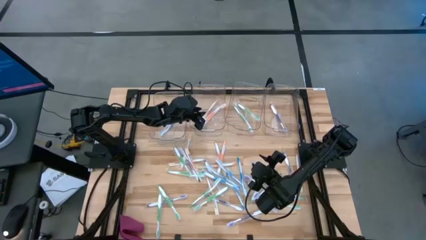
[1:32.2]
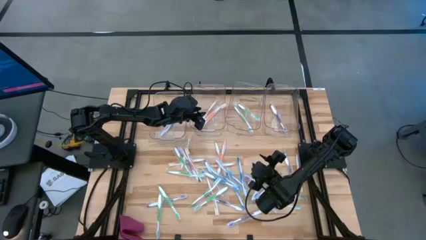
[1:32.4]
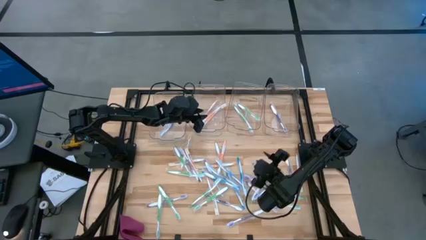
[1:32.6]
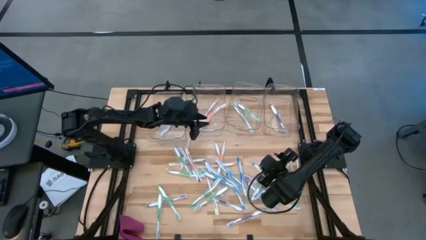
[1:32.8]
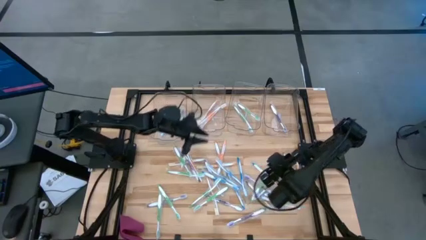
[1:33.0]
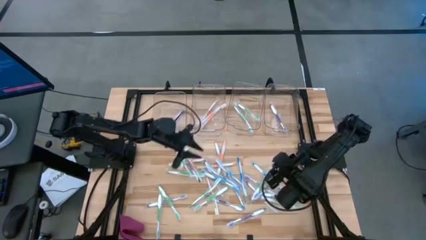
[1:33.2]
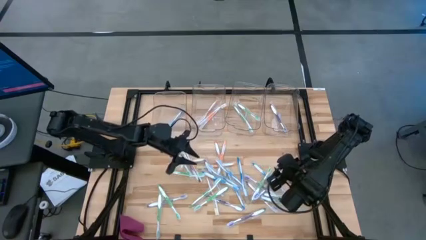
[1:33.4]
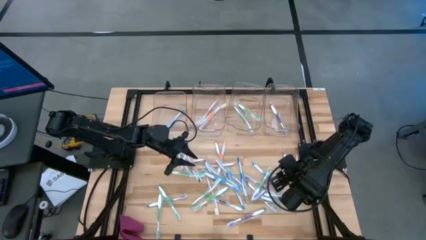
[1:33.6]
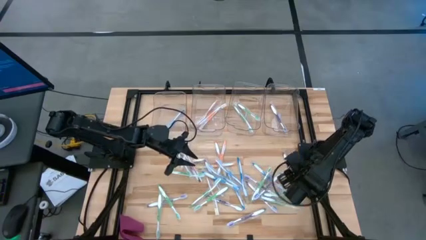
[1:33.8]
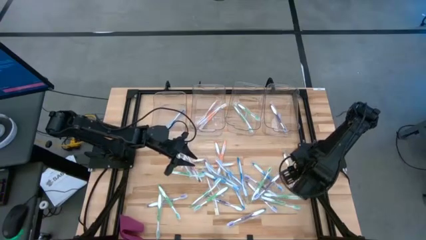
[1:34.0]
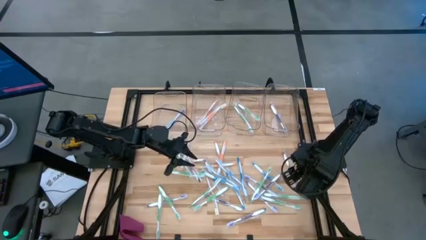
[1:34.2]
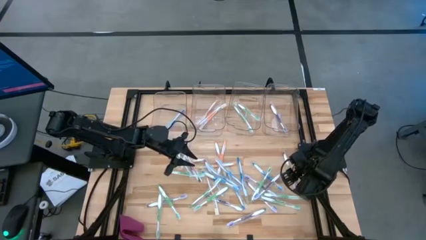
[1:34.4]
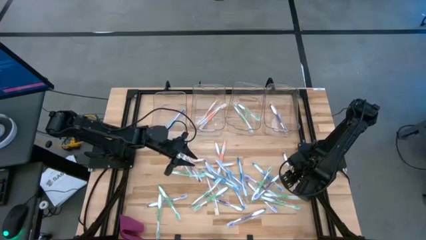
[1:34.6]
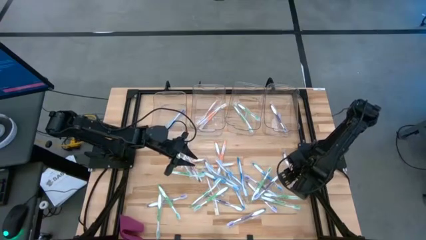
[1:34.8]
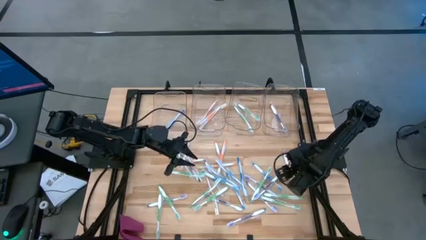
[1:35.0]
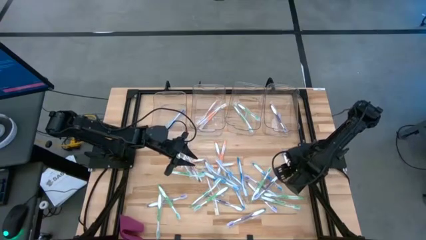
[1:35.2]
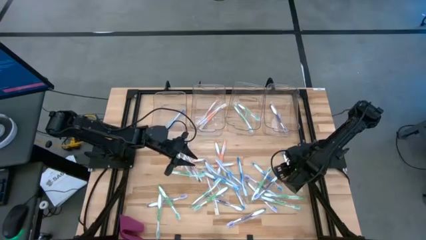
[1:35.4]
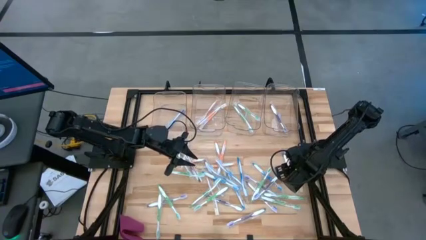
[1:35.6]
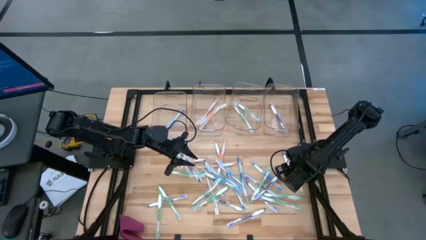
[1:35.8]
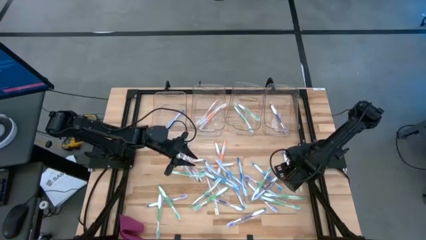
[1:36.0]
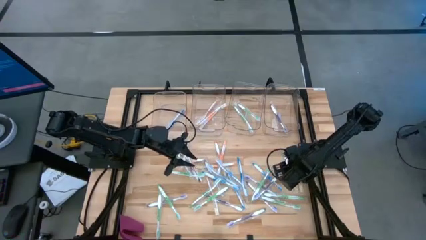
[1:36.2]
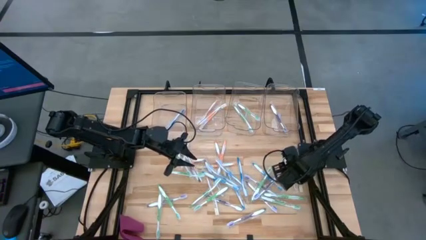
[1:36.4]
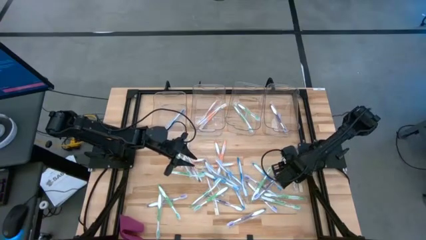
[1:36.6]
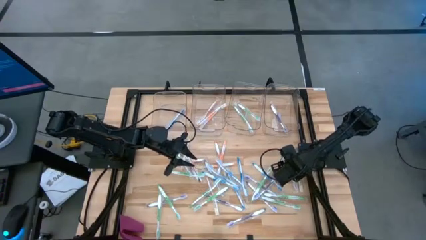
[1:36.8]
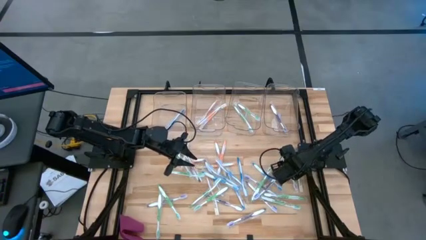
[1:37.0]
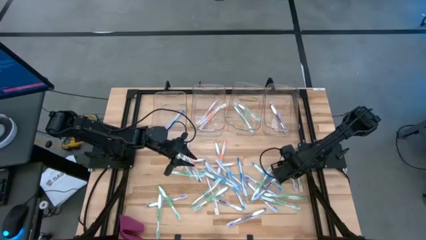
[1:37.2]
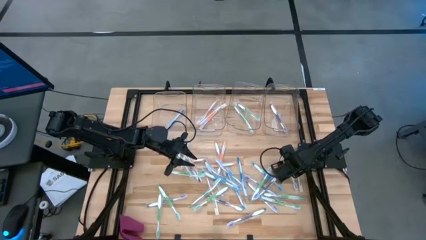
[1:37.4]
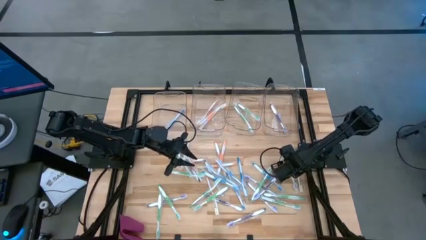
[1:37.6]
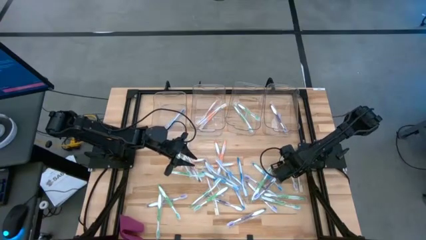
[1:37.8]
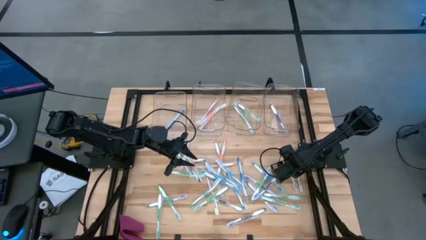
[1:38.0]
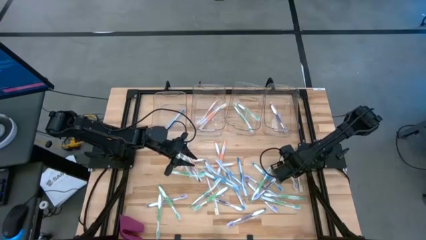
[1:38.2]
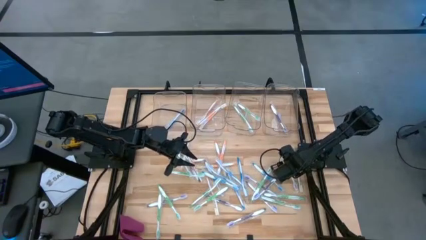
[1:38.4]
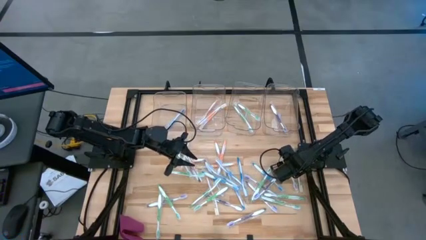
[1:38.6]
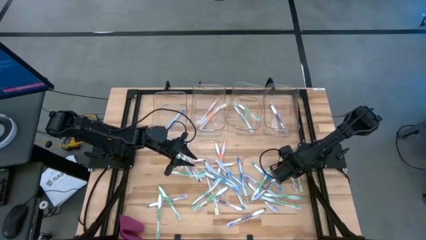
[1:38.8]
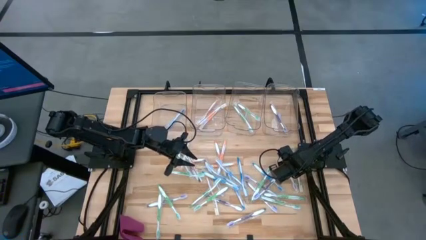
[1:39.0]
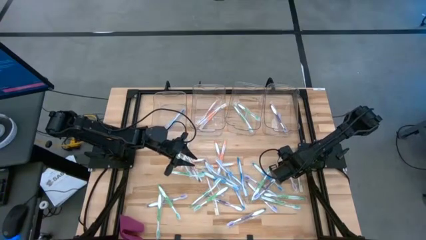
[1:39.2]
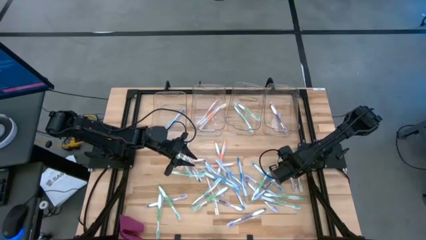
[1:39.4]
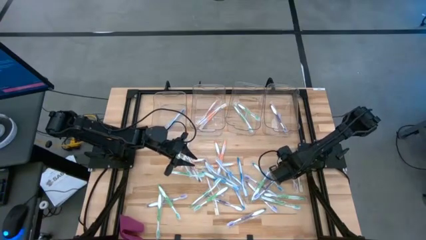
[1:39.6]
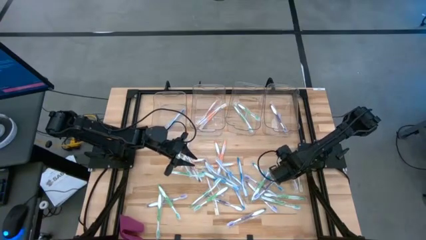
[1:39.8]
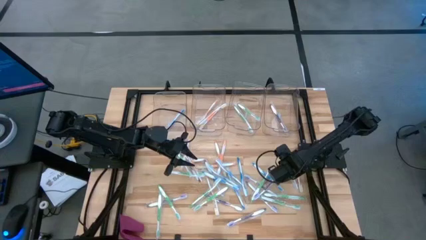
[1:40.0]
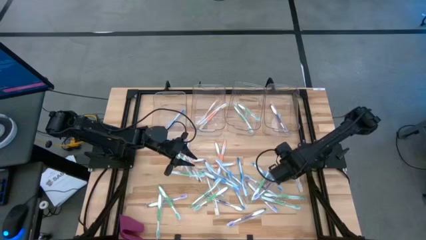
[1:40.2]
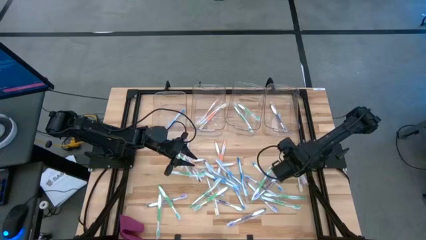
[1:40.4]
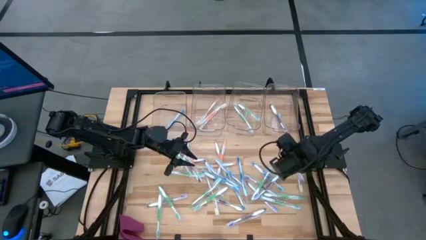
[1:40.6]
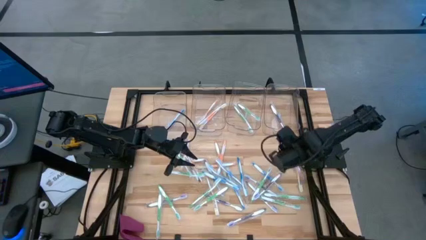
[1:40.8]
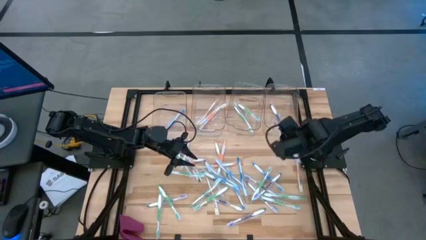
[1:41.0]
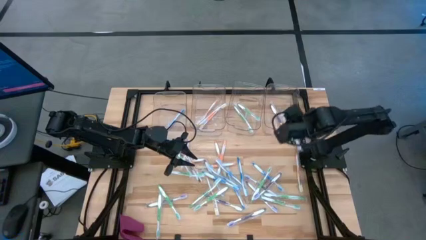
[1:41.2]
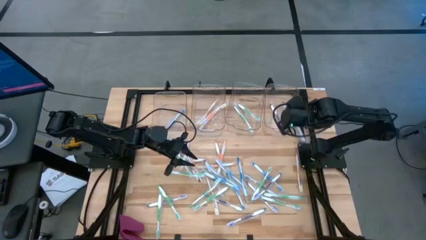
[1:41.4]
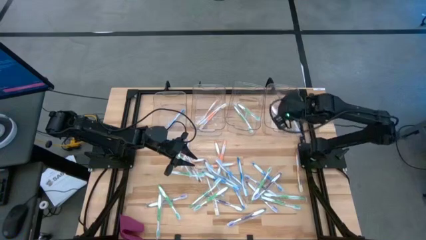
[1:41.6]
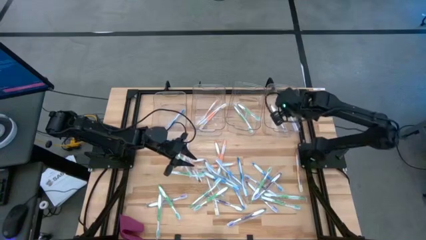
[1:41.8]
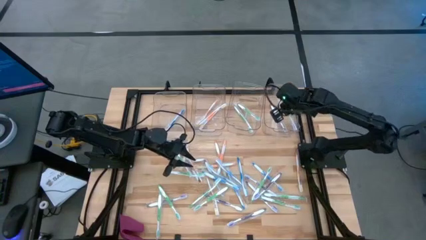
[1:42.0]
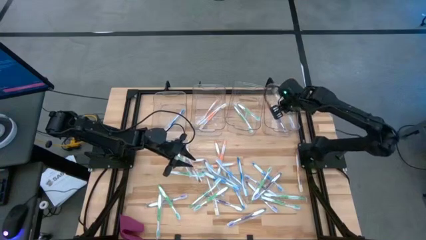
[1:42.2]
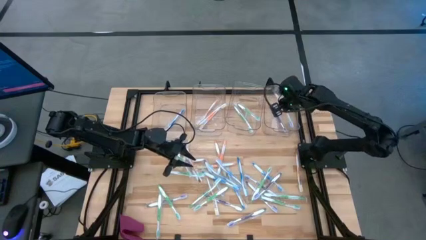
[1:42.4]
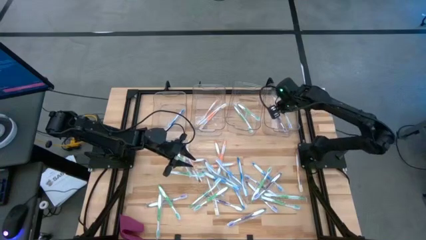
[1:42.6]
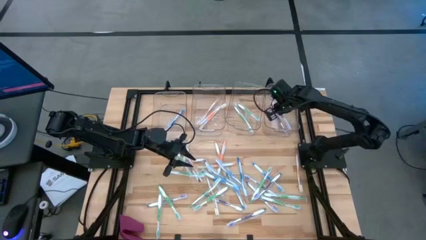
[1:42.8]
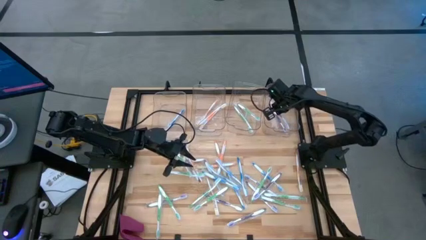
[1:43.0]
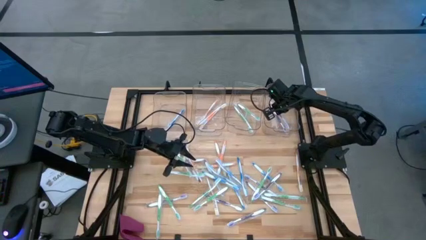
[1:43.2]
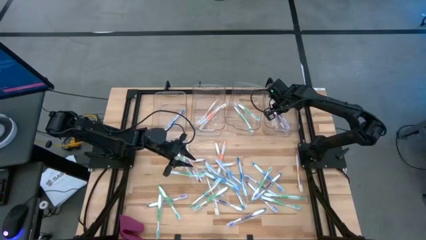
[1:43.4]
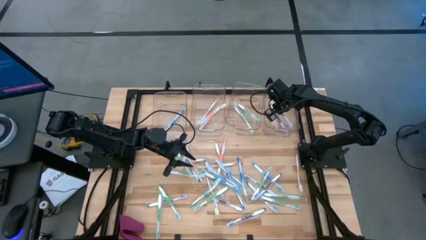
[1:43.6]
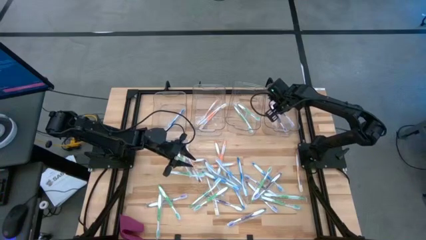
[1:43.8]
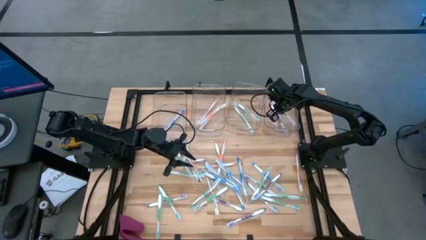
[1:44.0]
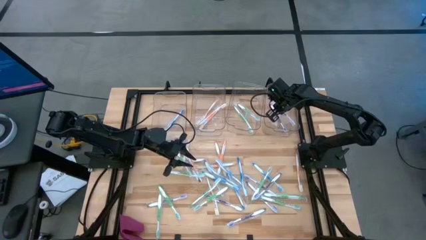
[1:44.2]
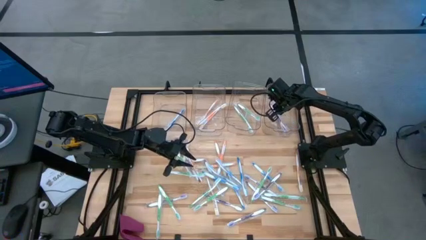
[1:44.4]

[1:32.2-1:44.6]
Task: Pick & Place Toothbrushes
Put the violet toothbrush into the right transparent bin

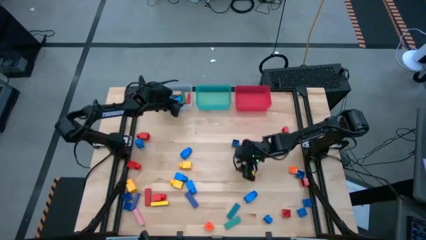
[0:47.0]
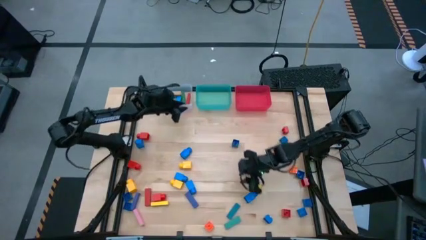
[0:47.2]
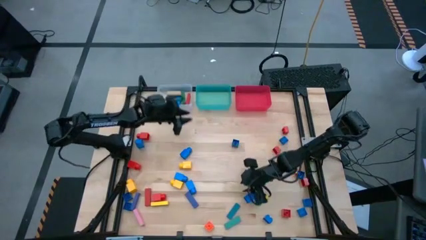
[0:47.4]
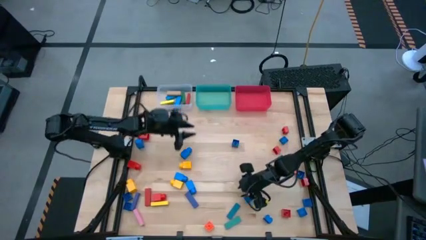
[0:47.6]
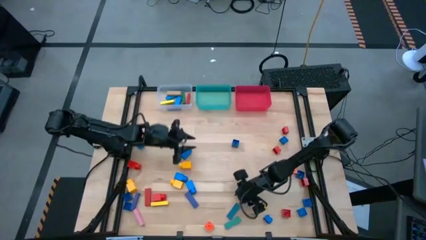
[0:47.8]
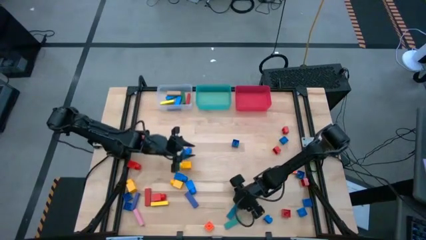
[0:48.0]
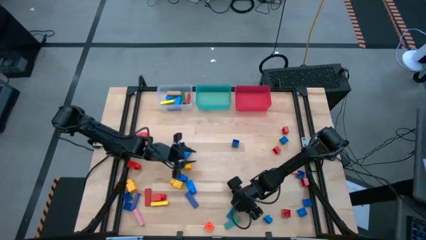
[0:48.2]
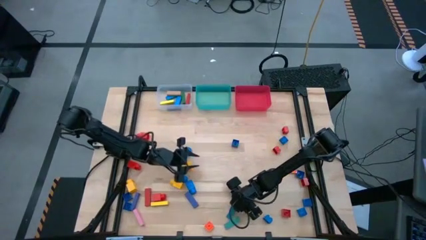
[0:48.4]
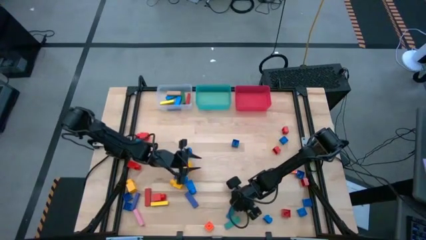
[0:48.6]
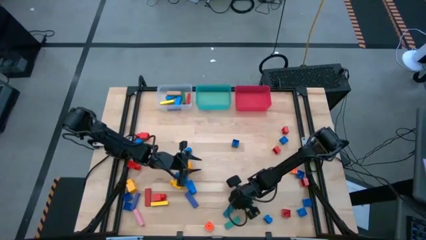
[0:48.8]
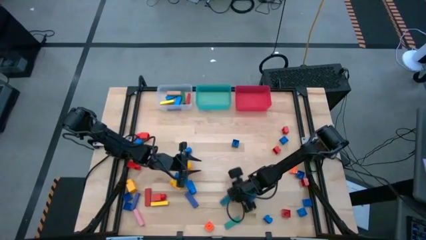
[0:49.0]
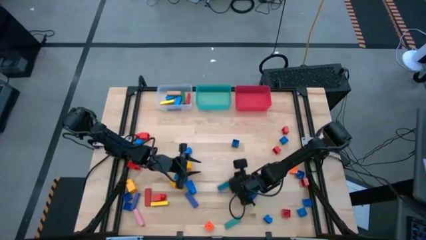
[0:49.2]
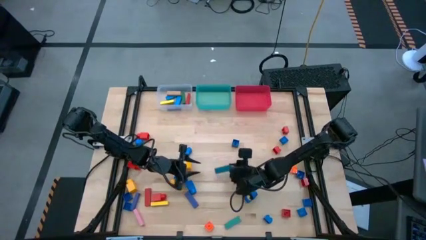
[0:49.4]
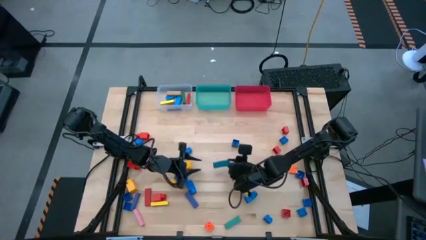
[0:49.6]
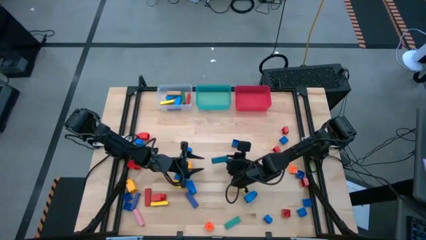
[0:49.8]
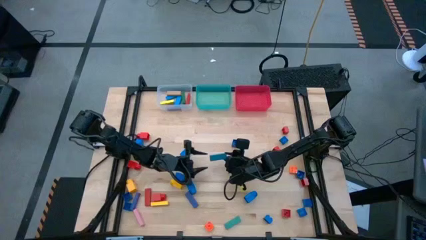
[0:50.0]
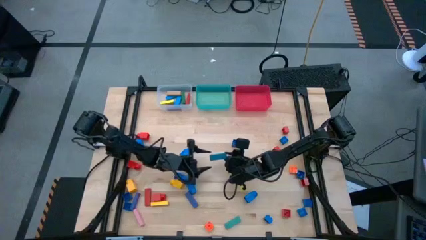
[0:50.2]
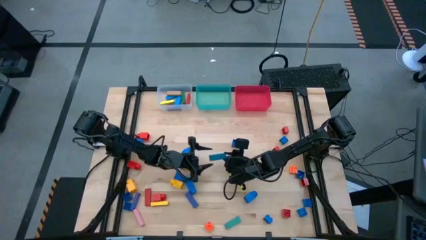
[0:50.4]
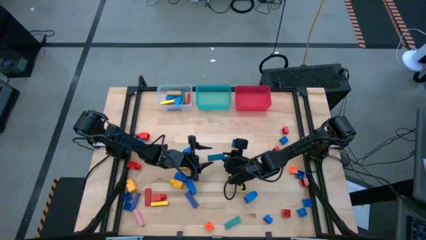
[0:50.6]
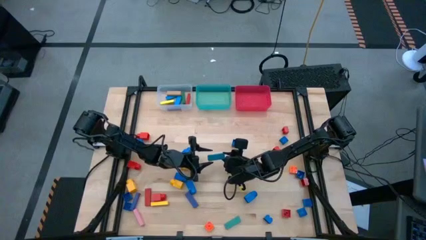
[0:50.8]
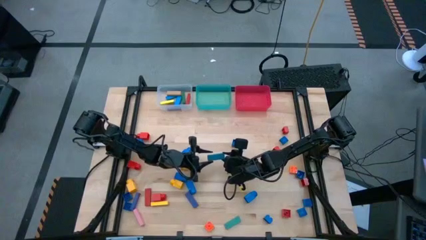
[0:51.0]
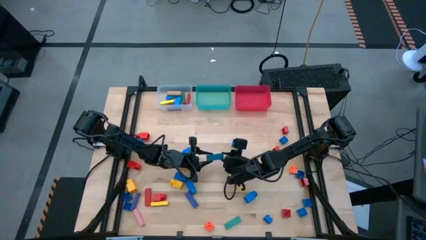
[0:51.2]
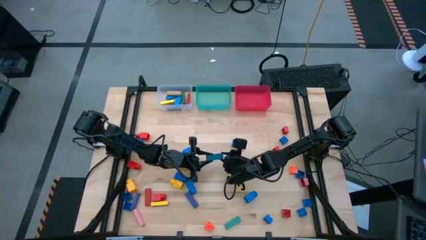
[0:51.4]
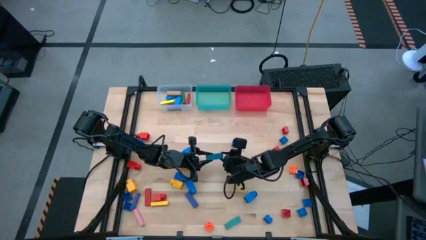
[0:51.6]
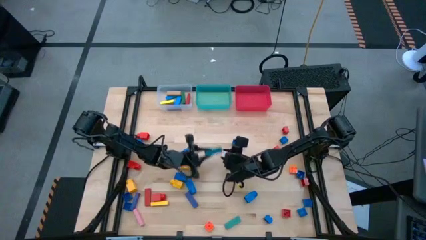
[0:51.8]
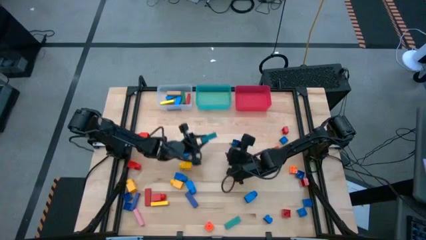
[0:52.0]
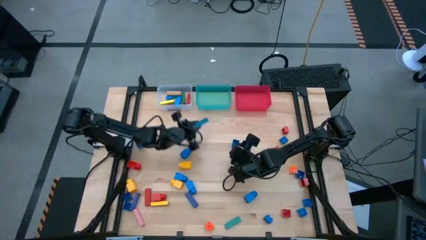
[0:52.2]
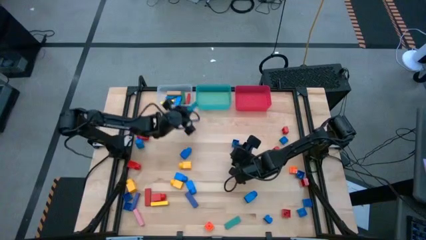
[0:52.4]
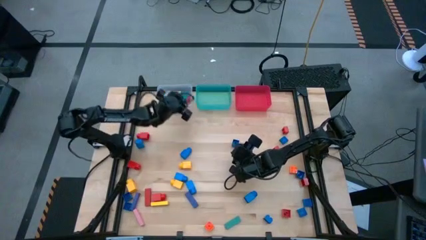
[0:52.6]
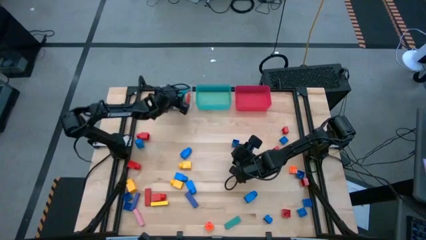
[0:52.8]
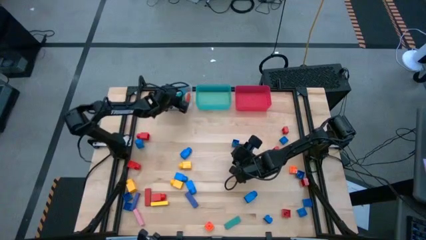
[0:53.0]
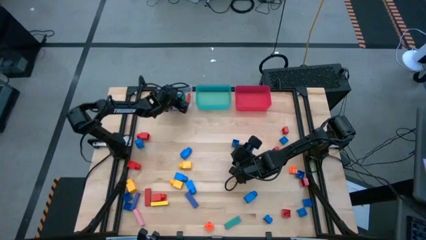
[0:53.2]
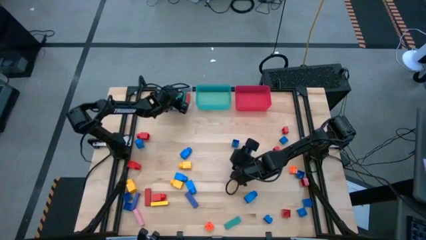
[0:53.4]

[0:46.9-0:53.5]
Task: Sort blocks by size
Put the light blue block into the transparent bin
